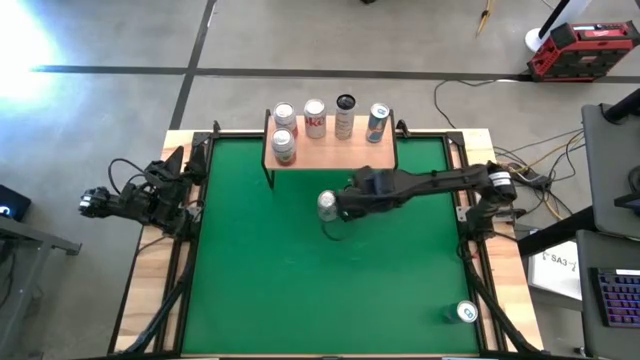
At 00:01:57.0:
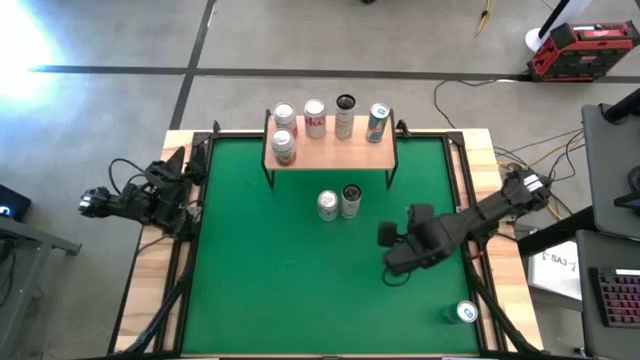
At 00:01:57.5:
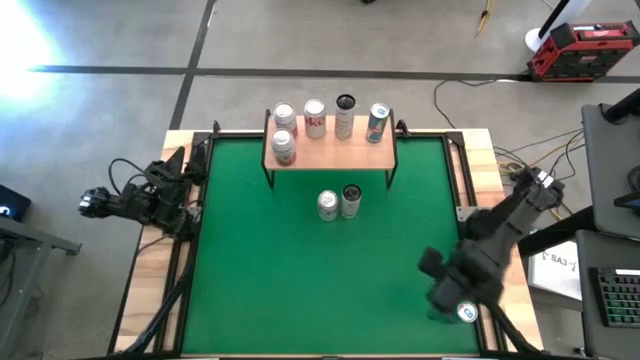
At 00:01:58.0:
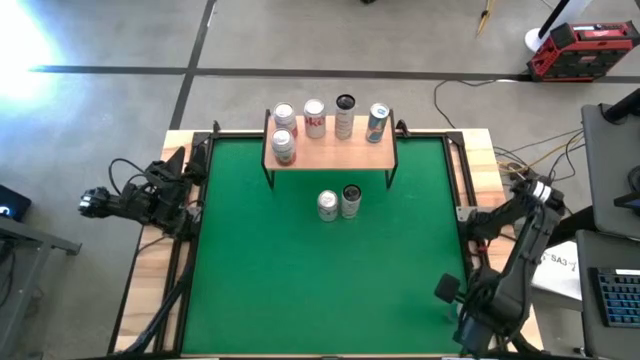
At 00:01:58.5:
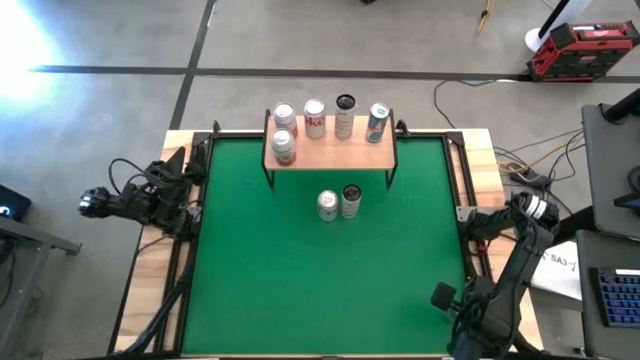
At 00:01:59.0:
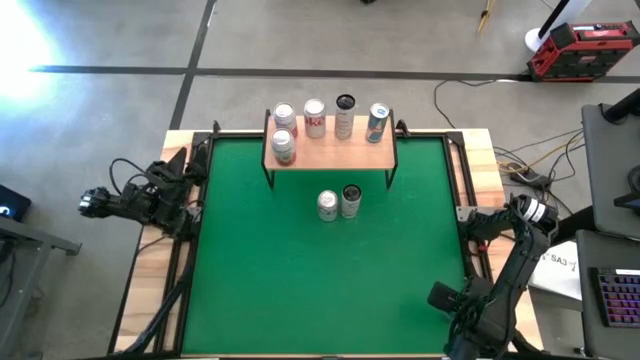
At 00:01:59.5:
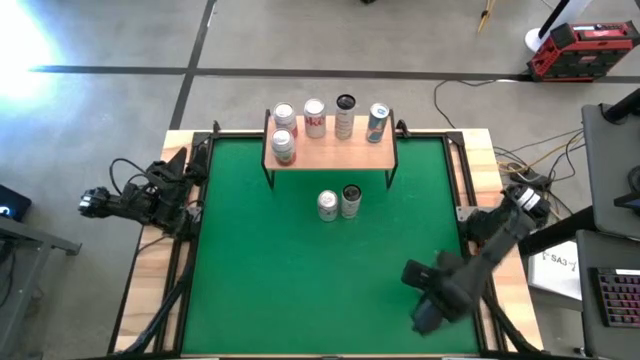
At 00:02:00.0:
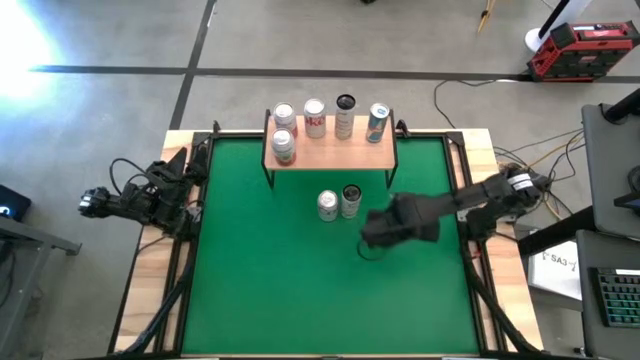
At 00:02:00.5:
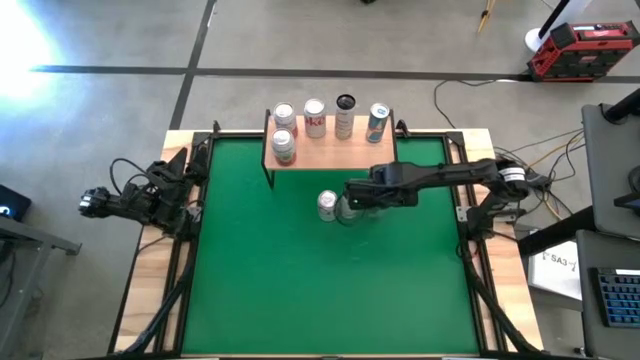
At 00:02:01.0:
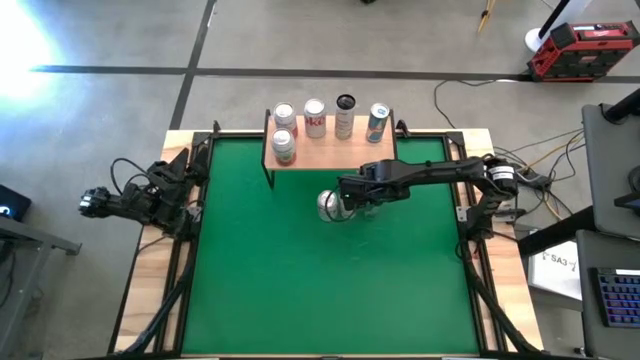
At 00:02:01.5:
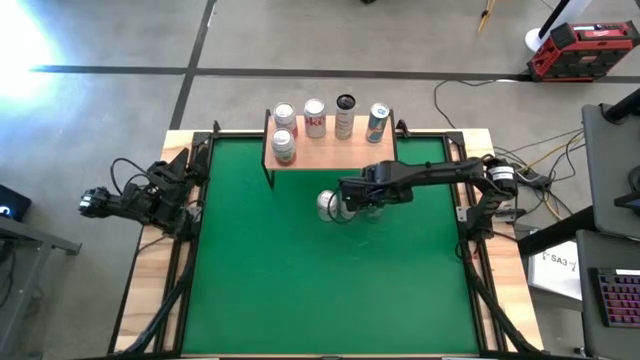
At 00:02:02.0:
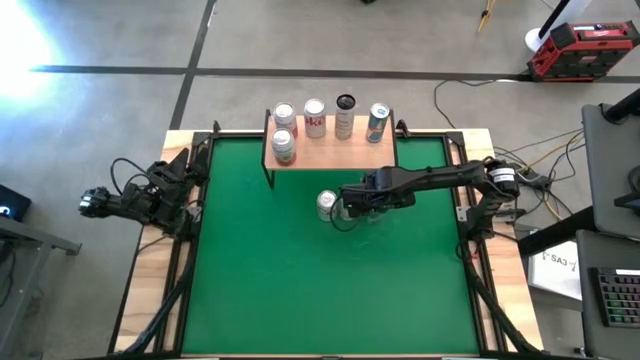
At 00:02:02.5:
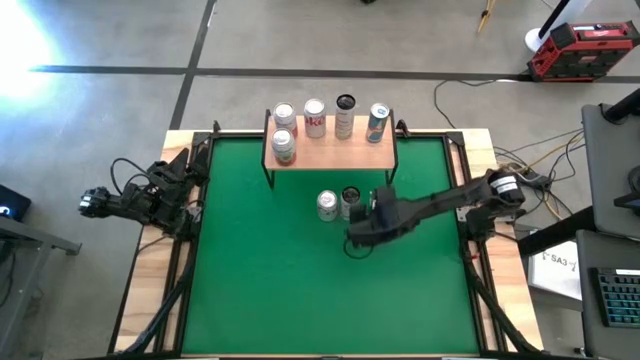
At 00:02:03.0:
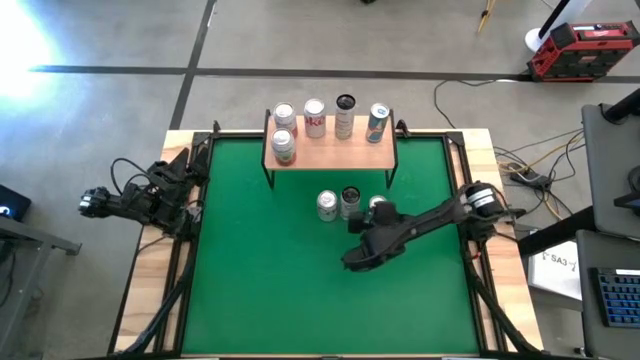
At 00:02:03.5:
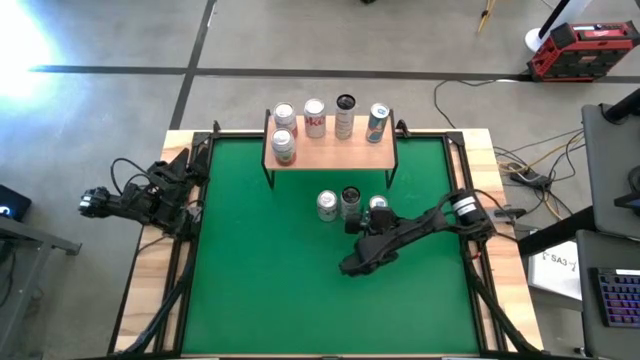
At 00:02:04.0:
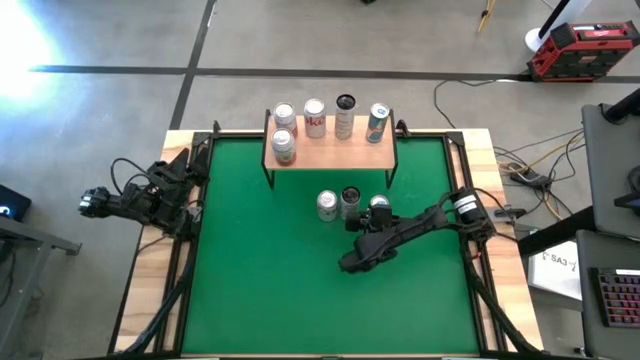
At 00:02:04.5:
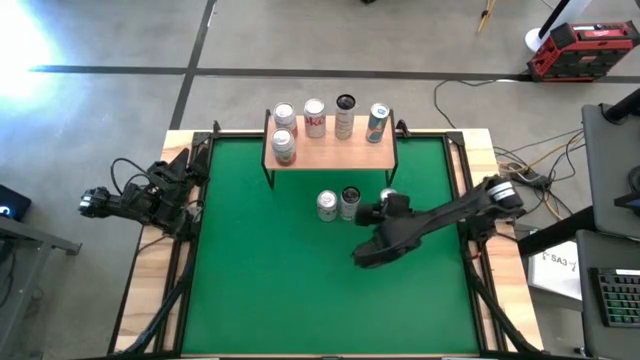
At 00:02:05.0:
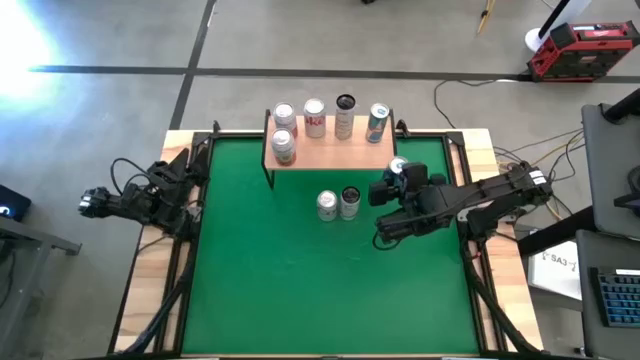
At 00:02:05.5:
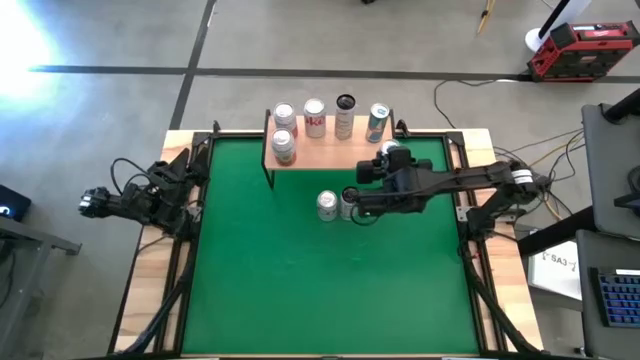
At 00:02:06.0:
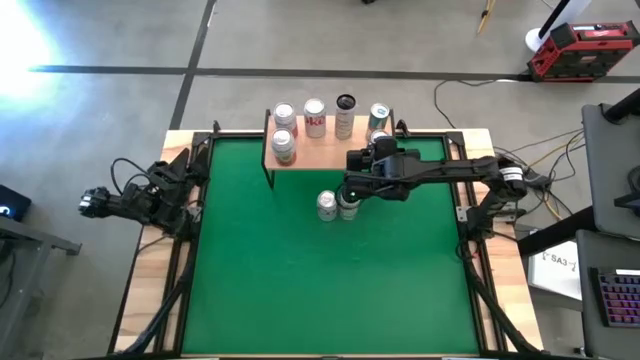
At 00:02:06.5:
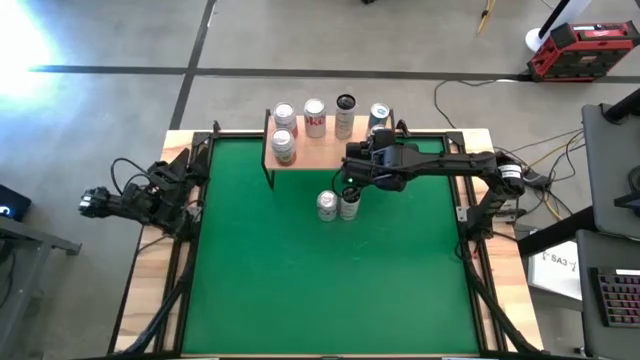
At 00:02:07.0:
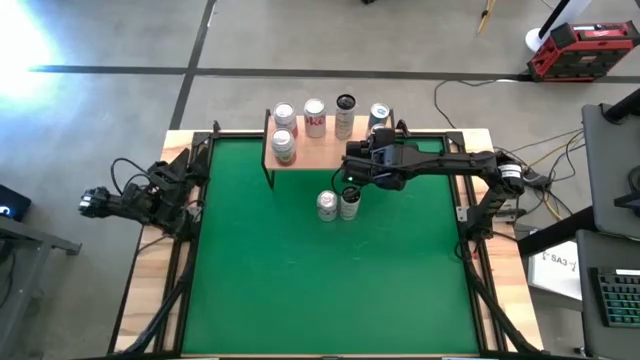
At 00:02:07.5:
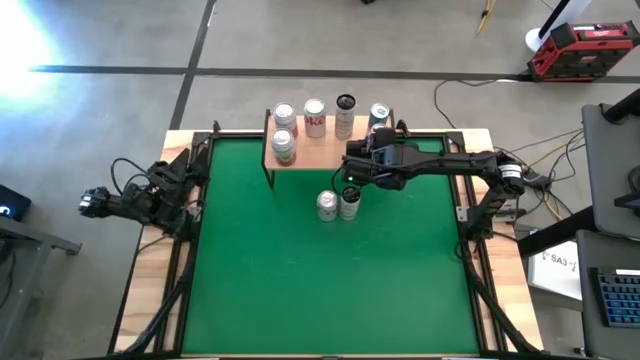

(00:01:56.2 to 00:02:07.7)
Task: Place canned beverage on shelf
Put the blue soda can on the shelf aligned with the other blue soda can

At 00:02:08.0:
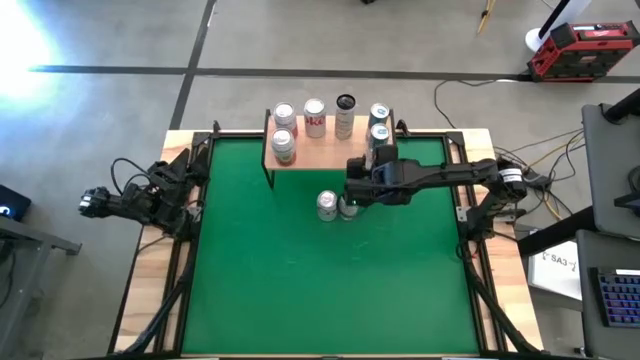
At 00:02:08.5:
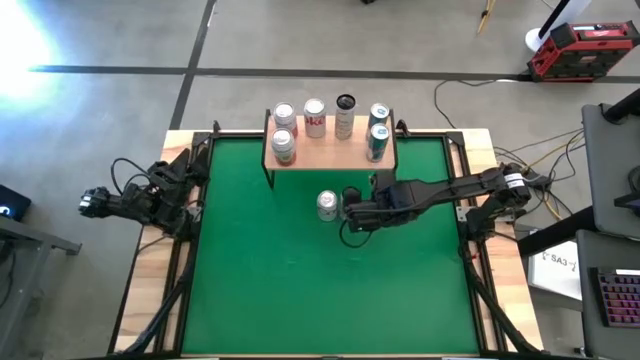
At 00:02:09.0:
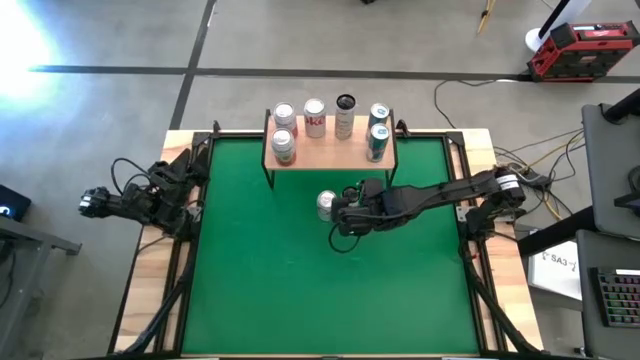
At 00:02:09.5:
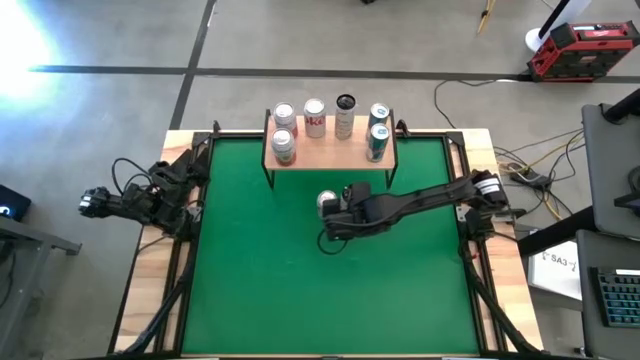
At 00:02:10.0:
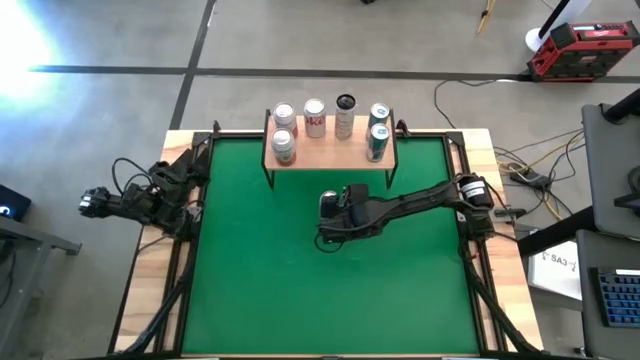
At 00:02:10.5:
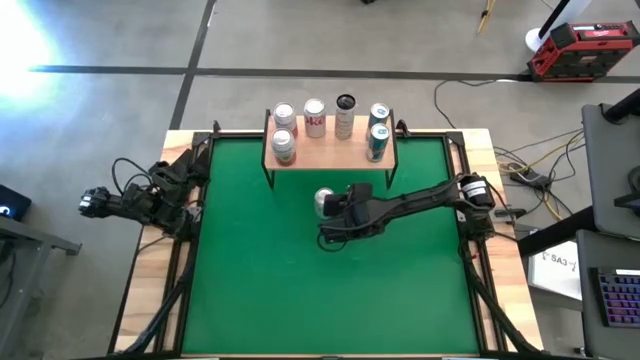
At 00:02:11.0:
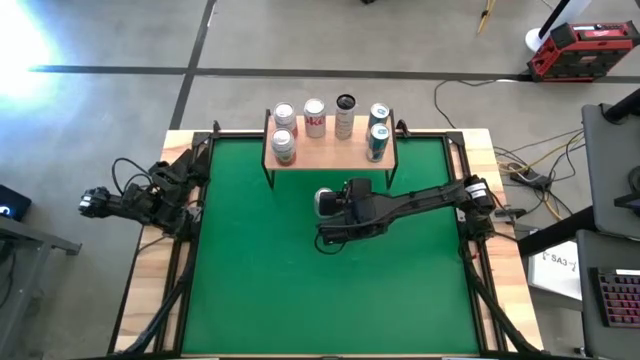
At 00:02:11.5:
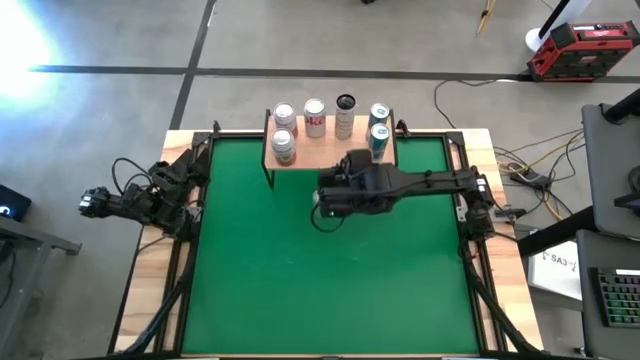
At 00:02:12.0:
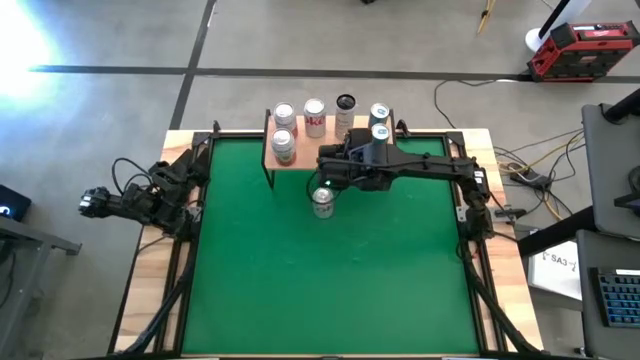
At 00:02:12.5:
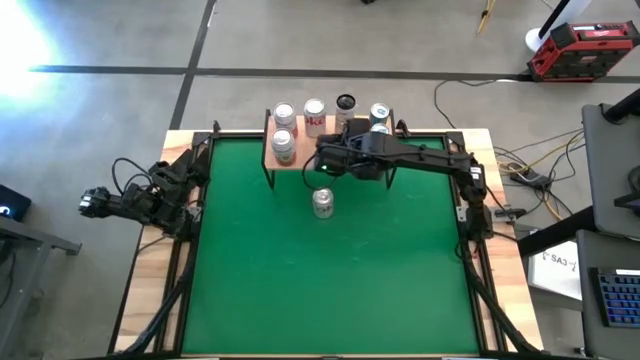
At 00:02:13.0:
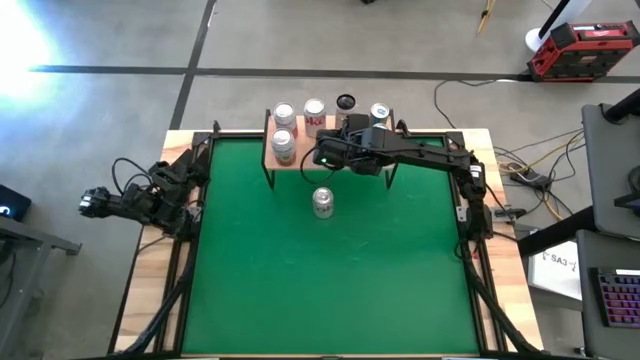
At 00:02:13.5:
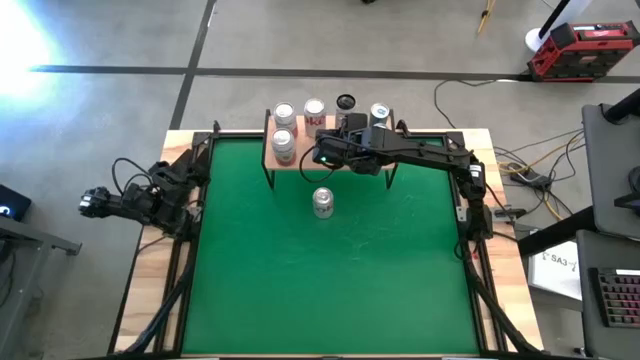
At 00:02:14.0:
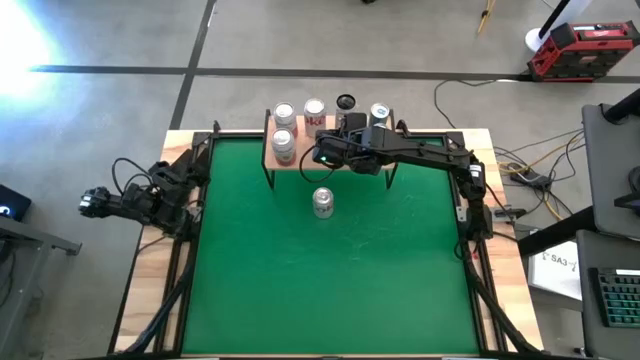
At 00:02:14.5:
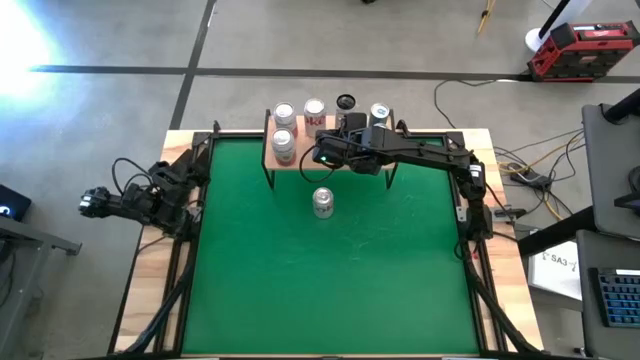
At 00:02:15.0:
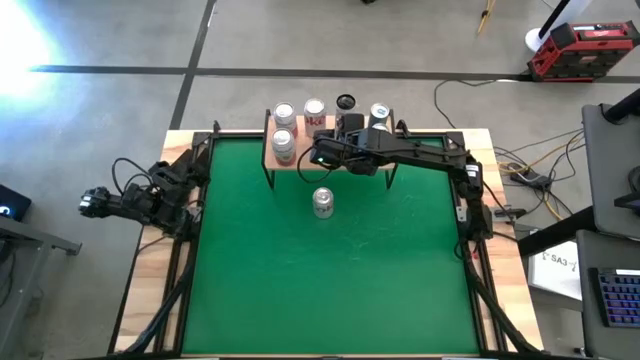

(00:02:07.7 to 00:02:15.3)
Put the white-yellow soda can on the shelf aligned with the other white-yellow soda can
